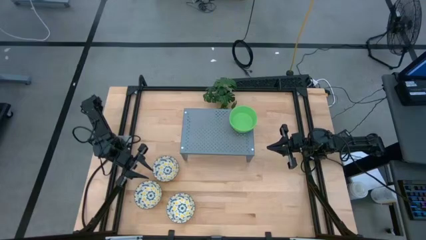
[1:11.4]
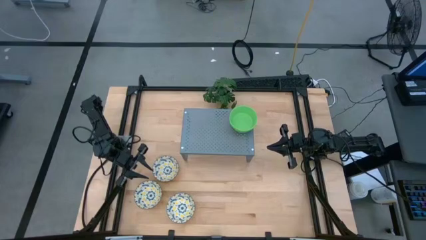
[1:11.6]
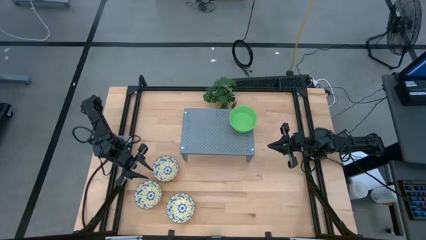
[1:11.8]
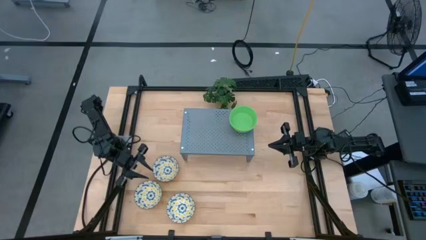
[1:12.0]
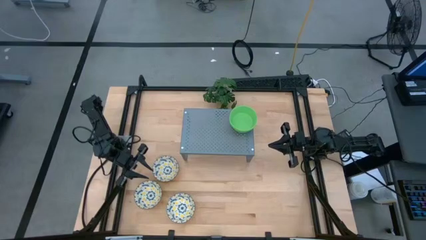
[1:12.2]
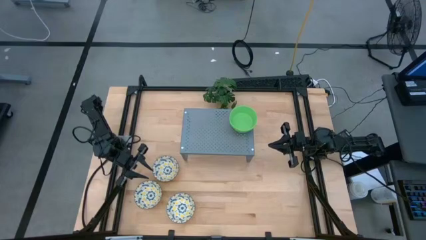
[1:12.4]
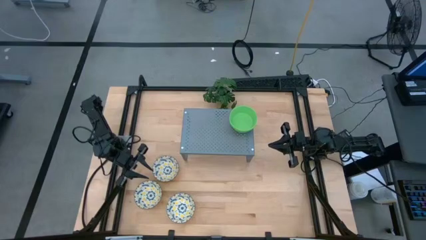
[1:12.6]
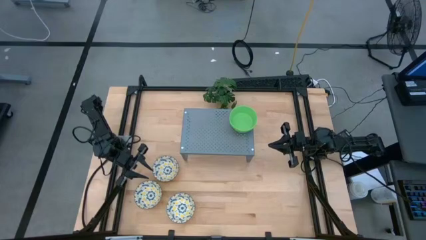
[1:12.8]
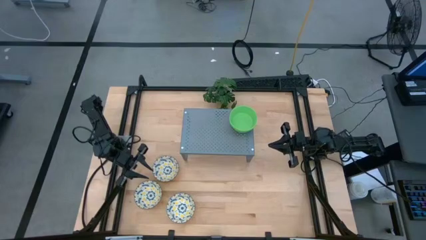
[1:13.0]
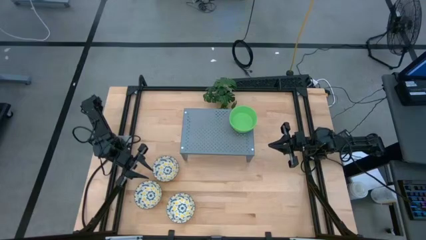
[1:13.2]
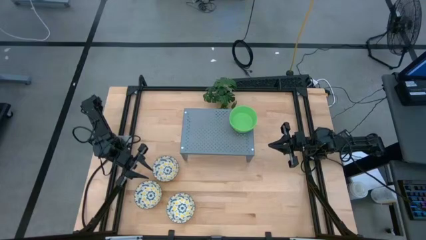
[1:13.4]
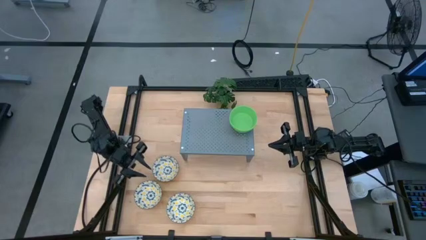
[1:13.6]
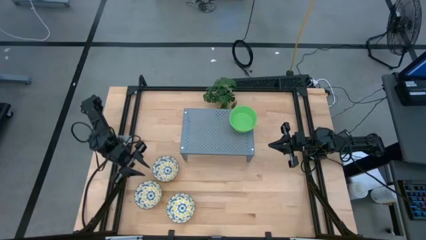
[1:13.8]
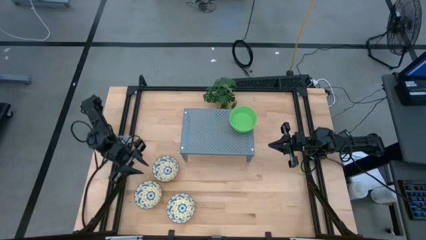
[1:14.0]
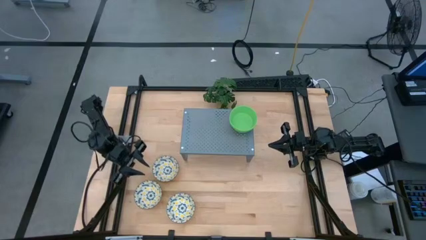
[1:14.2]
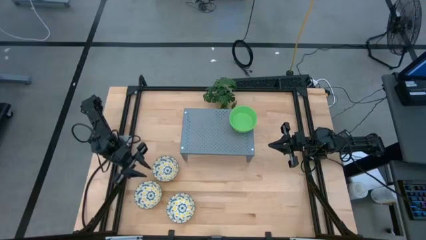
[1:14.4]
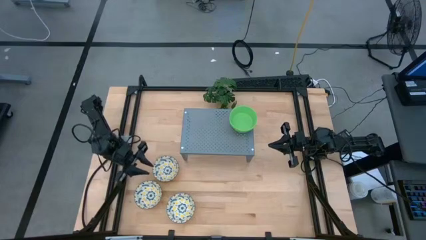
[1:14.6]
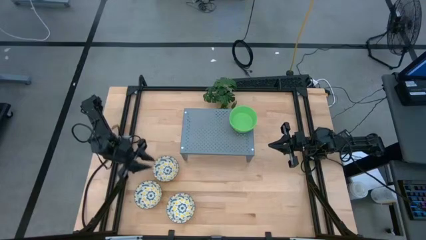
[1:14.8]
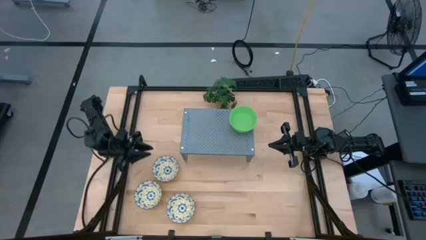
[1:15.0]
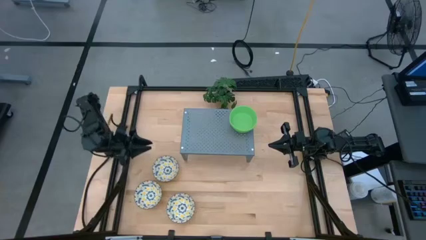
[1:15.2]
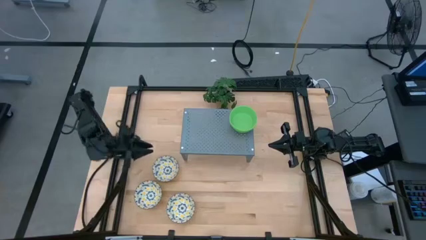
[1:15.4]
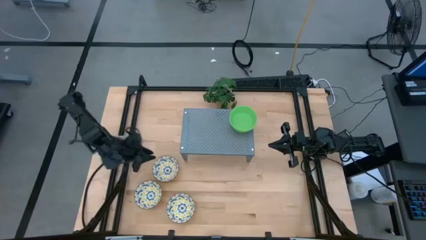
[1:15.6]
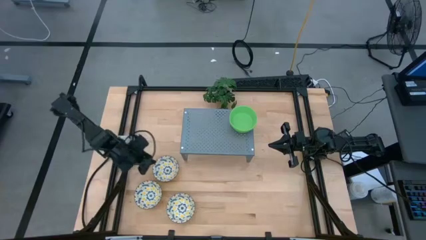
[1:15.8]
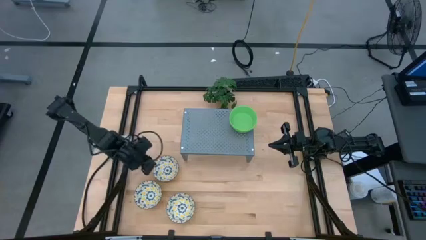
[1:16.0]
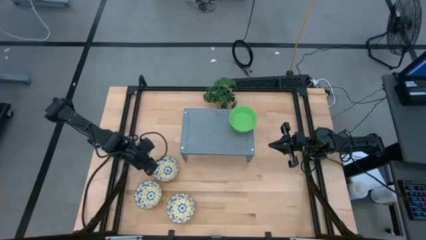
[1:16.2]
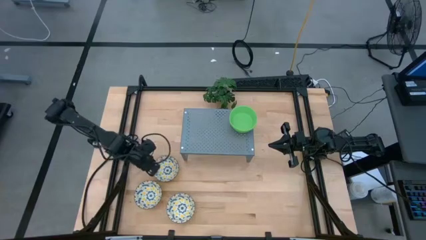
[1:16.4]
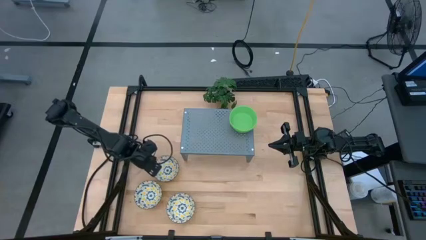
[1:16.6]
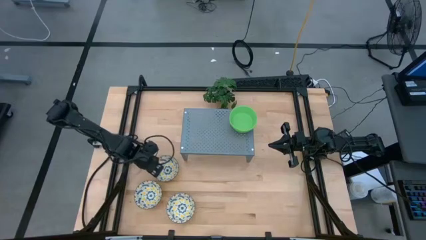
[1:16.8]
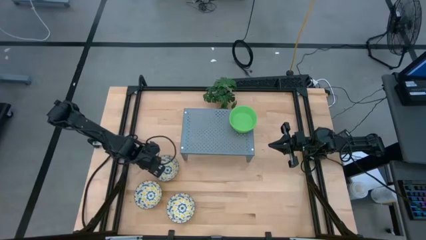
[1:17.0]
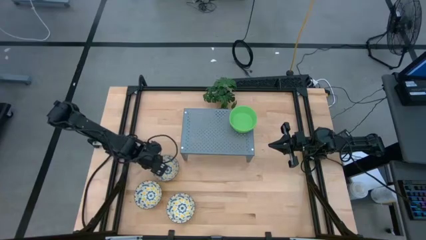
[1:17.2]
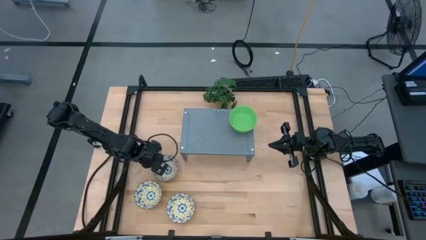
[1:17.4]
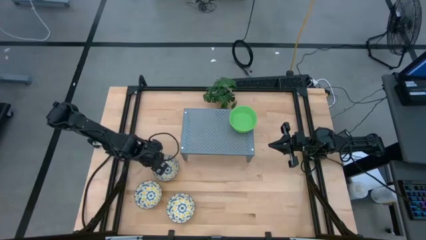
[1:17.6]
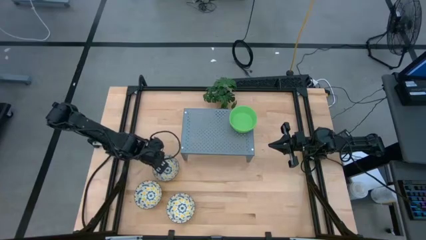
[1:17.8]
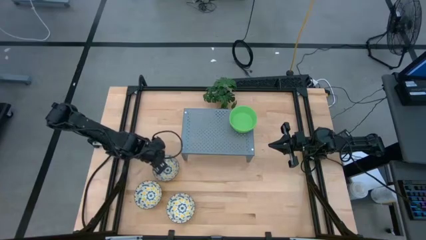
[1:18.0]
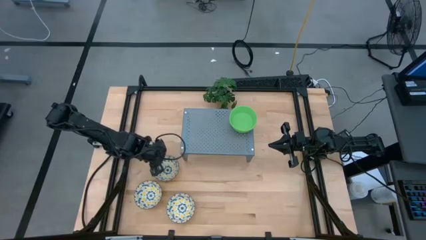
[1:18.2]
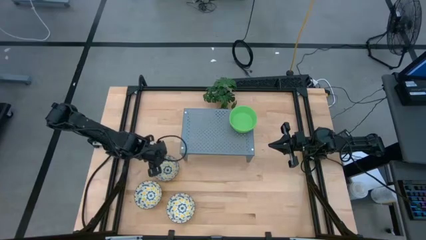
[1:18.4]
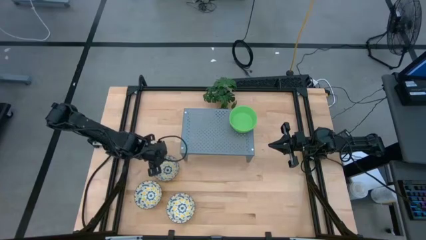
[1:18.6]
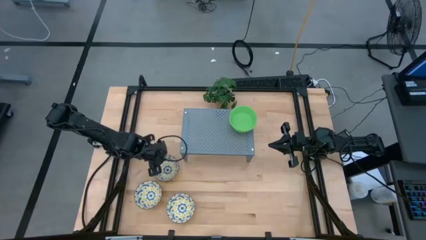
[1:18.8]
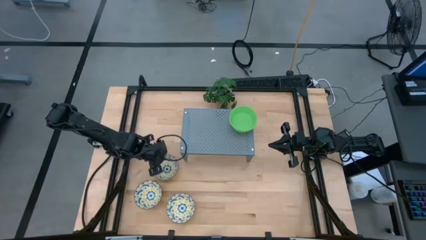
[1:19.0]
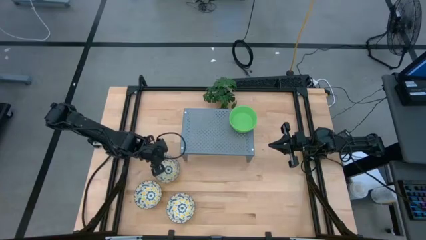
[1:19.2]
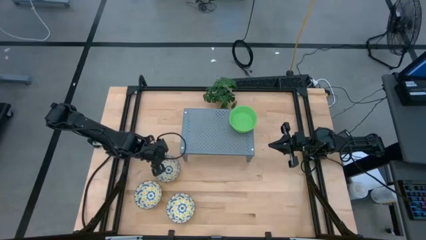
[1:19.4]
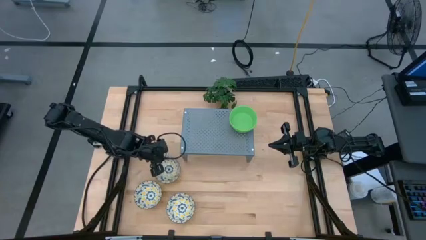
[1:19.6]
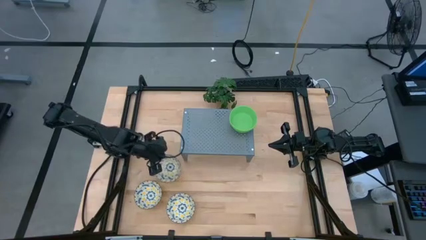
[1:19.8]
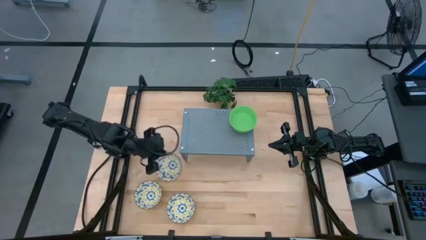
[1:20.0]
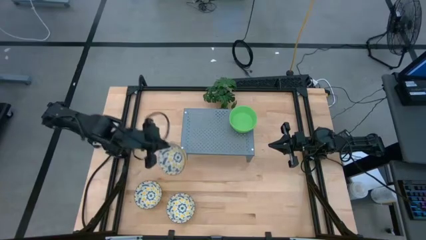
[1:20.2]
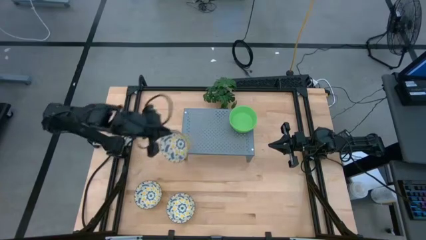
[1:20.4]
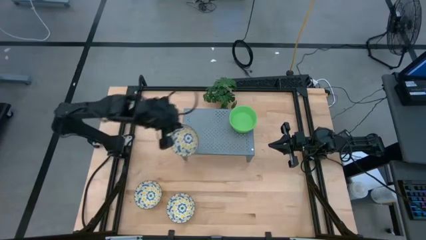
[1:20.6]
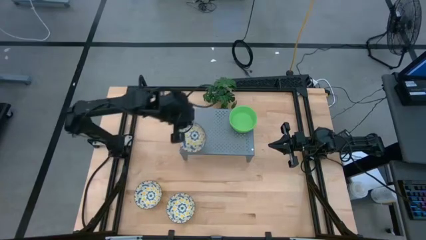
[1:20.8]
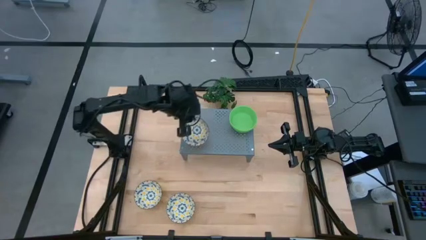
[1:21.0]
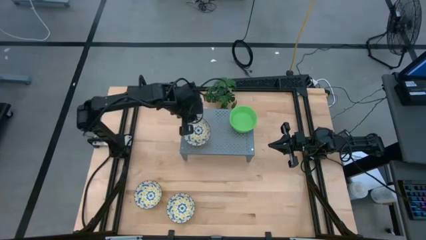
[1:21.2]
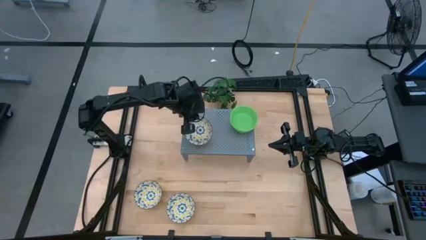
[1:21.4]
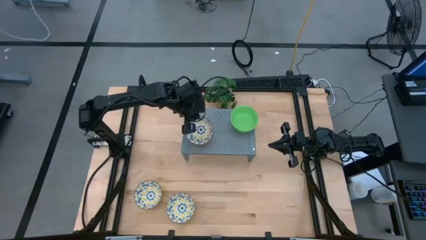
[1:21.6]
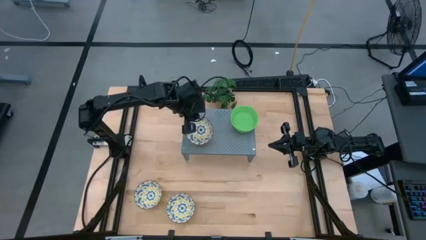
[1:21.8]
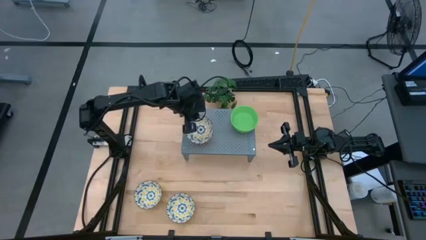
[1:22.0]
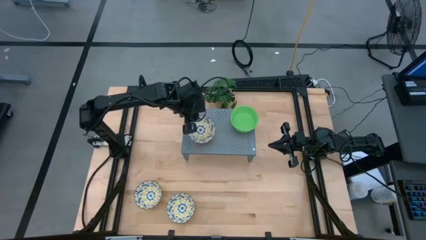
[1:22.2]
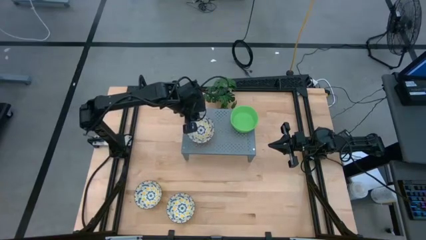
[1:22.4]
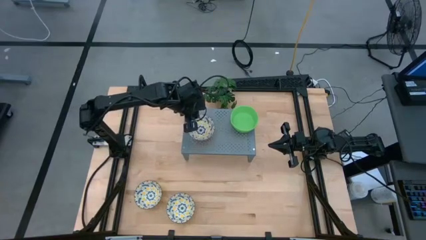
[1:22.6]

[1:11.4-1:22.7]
Task: Pick & Place Mini bowls
Put the top yellow bowl on the shelf

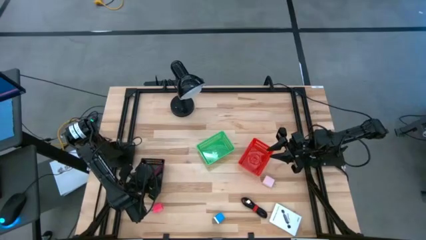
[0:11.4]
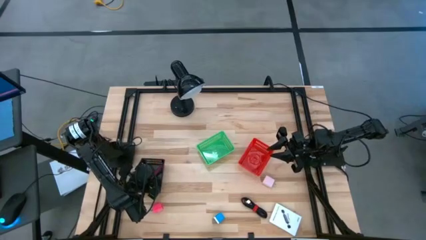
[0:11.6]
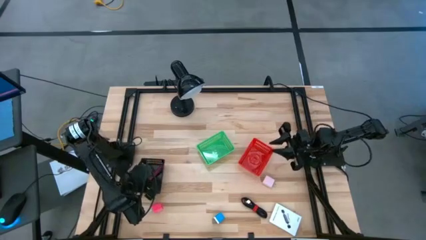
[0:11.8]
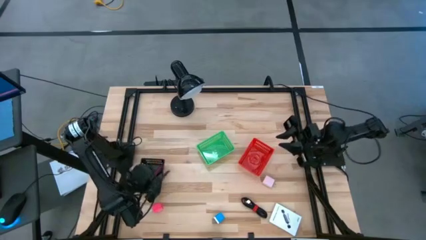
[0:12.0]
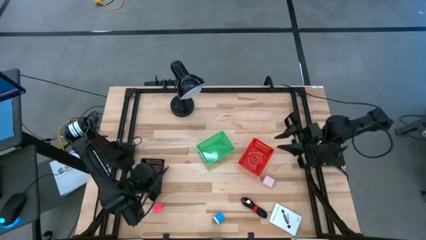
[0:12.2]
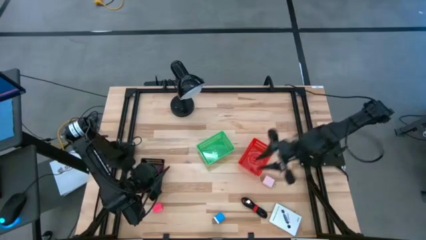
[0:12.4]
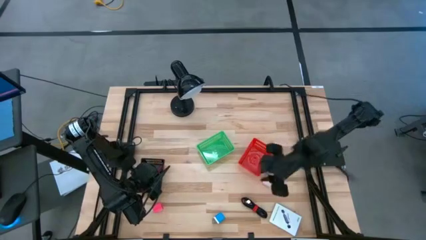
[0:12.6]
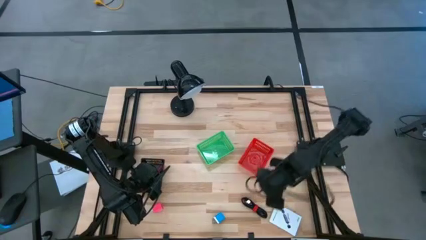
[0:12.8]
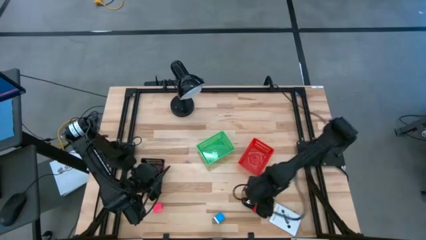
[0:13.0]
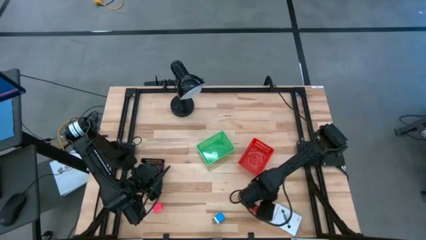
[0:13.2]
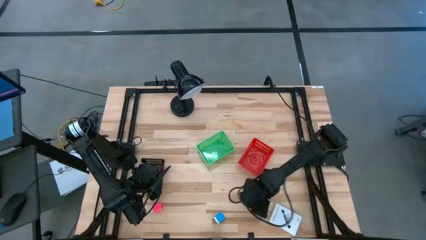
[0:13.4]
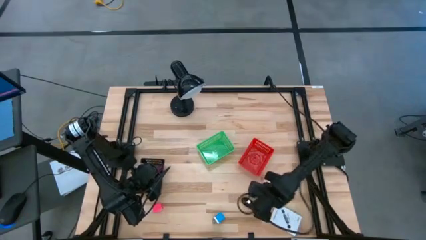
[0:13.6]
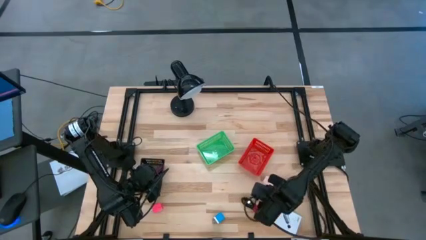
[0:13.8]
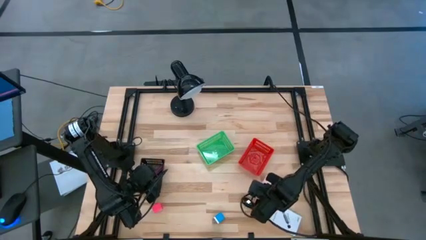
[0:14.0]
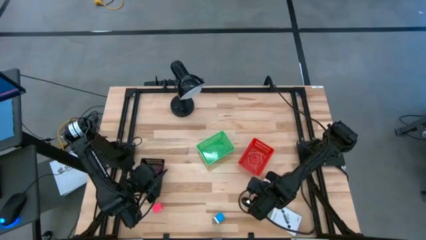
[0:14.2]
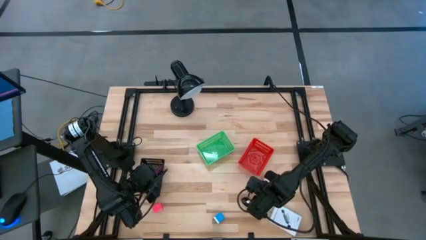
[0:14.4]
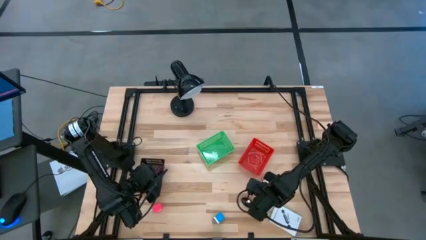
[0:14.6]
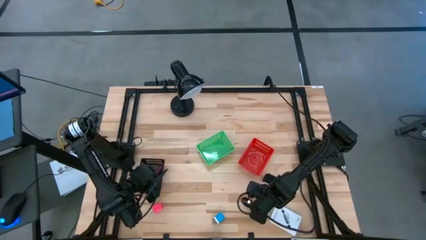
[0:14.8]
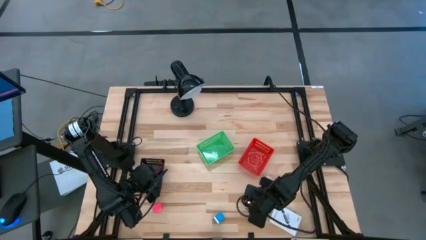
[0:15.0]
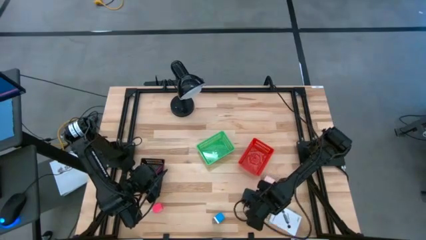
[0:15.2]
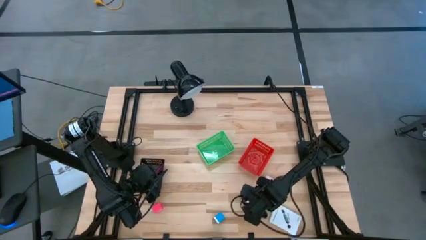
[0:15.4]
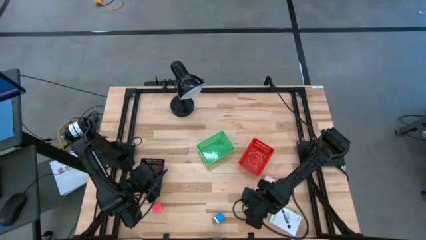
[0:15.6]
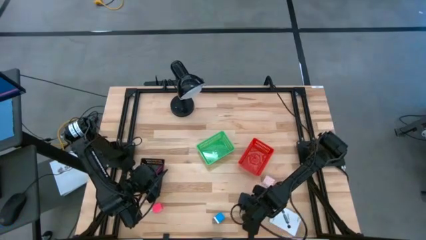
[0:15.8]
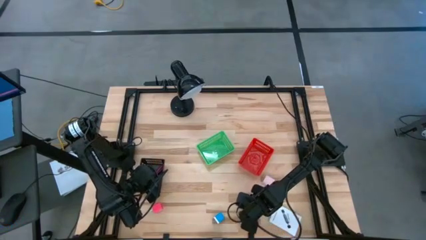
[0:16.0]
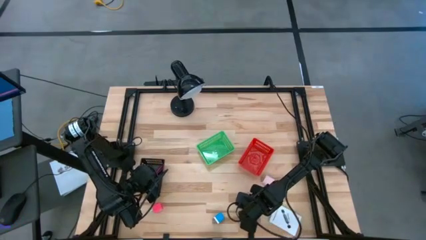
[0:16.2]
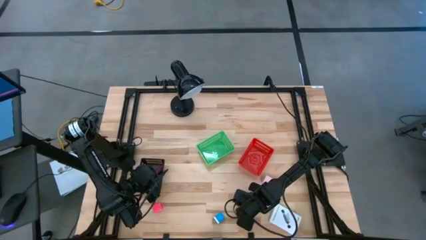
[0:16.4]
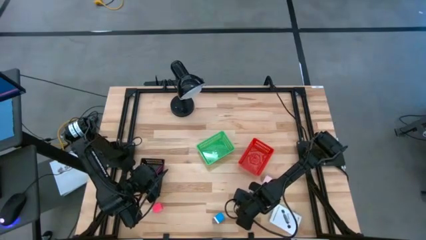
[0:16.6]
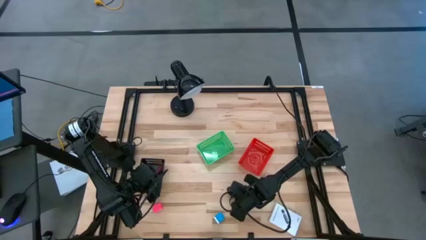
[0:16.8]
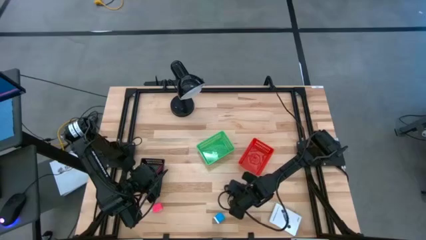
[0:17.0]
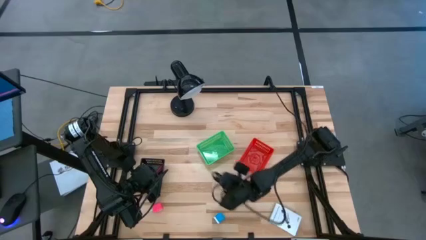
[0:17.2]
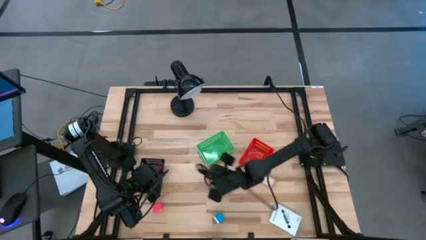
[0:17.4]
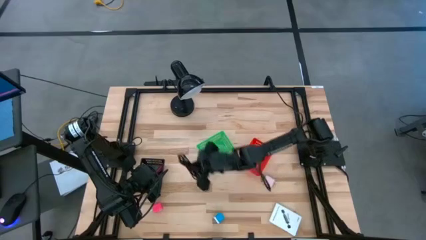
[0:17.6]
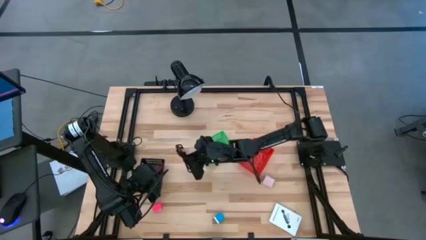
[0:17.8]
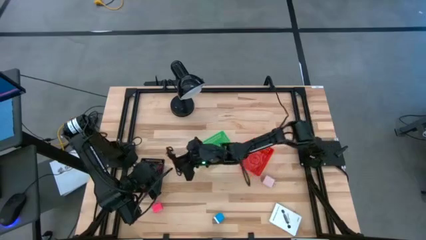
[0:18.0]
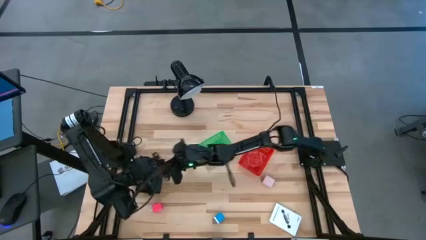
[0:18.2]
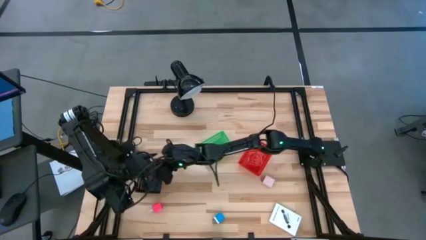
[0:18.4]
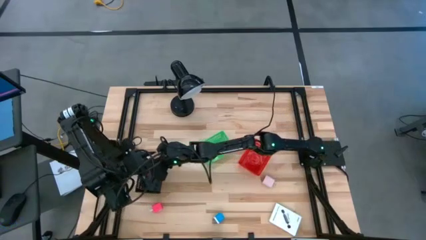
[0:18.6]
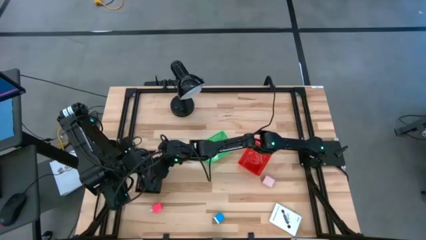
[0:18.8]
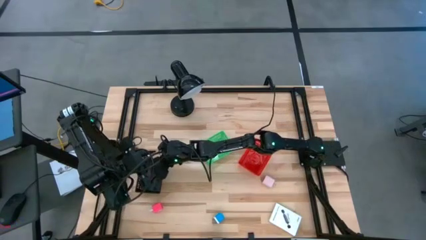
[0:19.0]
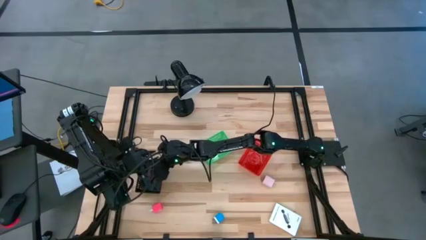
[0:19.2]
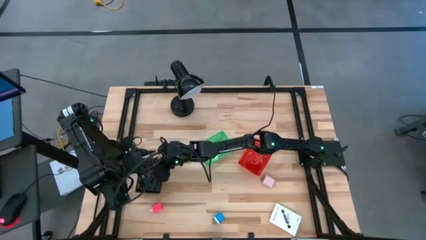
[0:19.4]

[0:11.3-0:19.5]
Task: Pick and place items into bin
Put the black charger cable into the black bin
